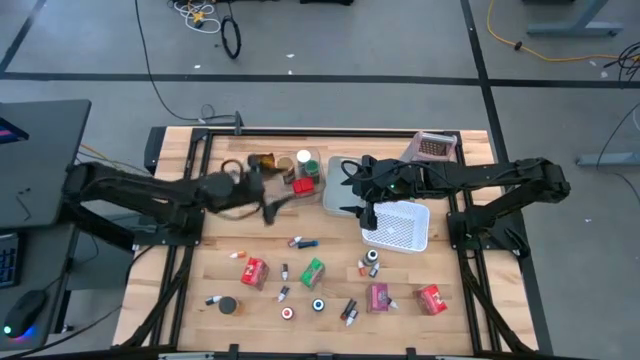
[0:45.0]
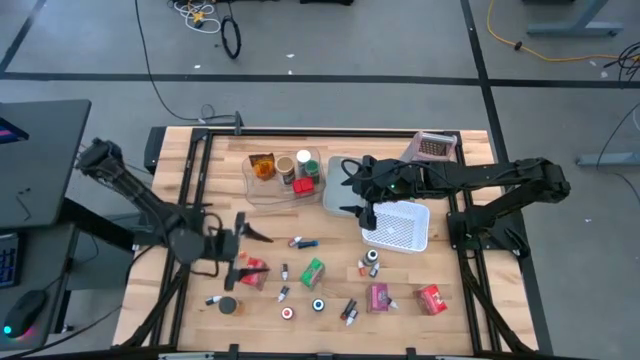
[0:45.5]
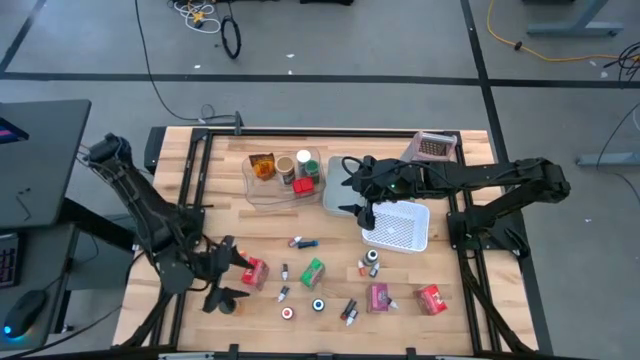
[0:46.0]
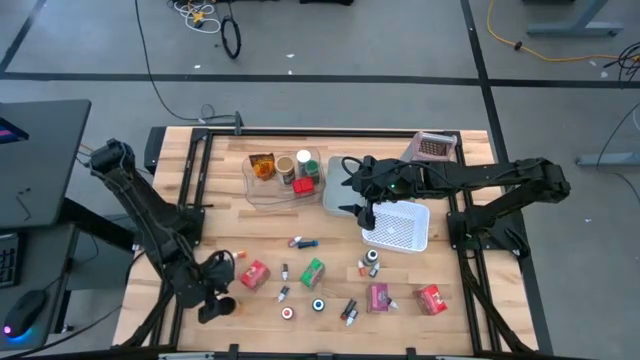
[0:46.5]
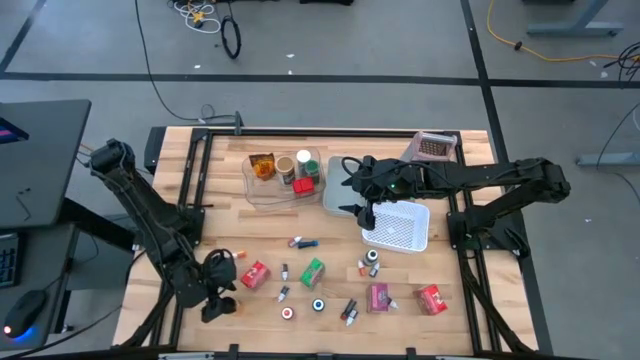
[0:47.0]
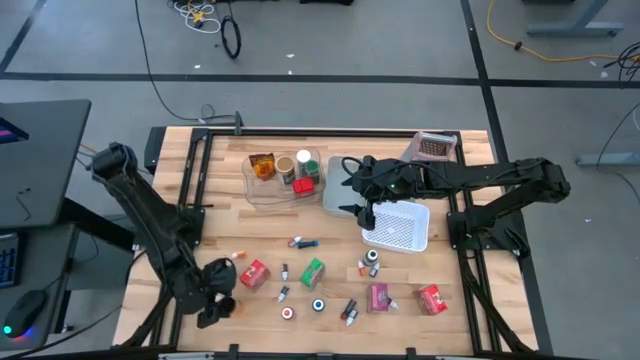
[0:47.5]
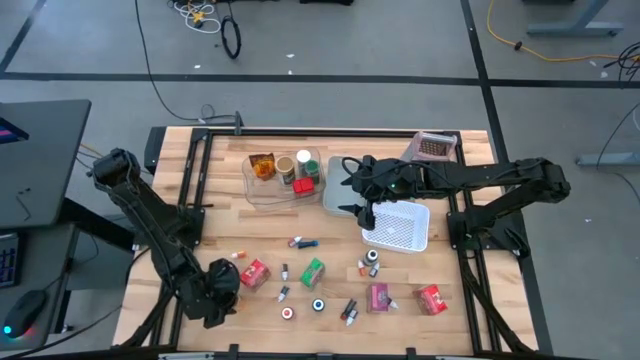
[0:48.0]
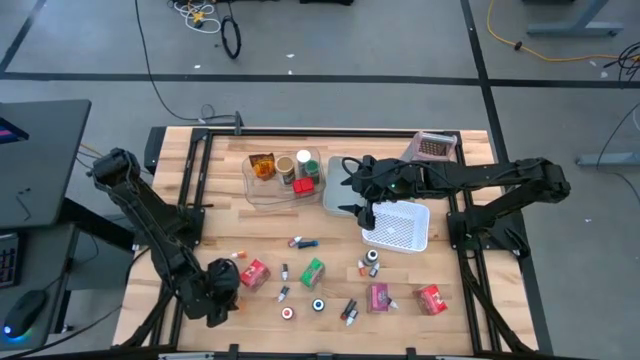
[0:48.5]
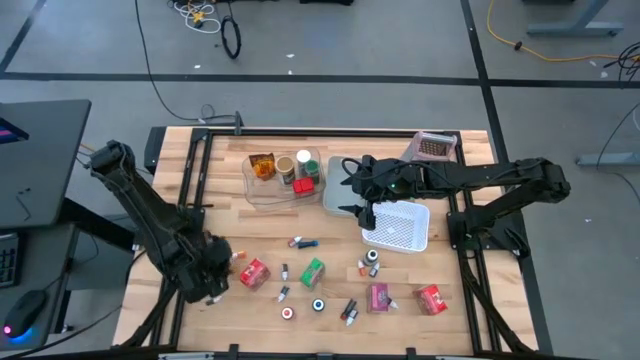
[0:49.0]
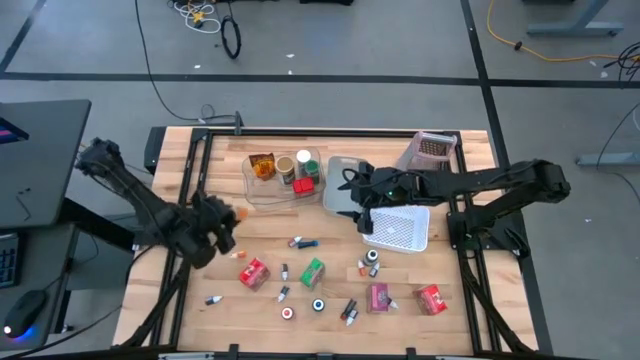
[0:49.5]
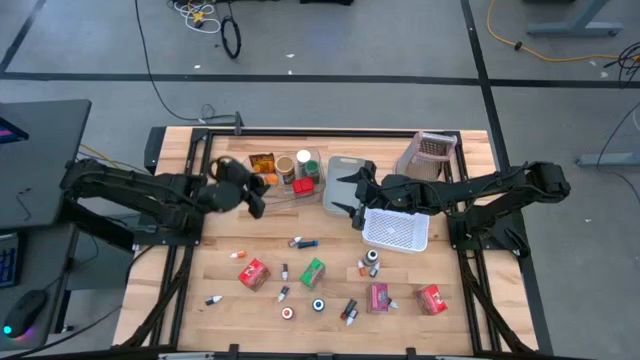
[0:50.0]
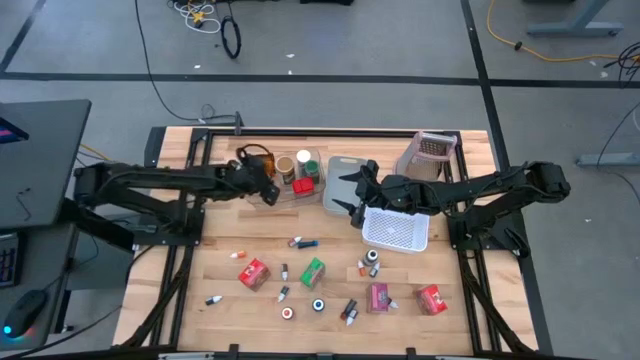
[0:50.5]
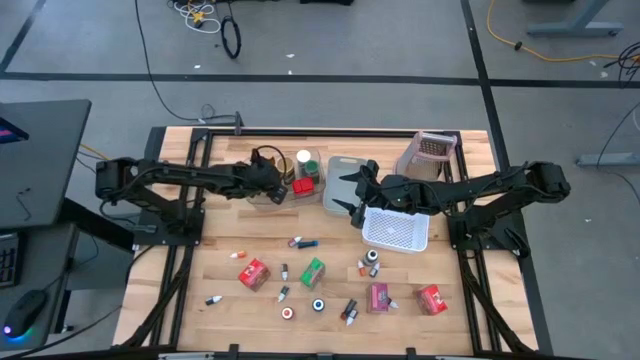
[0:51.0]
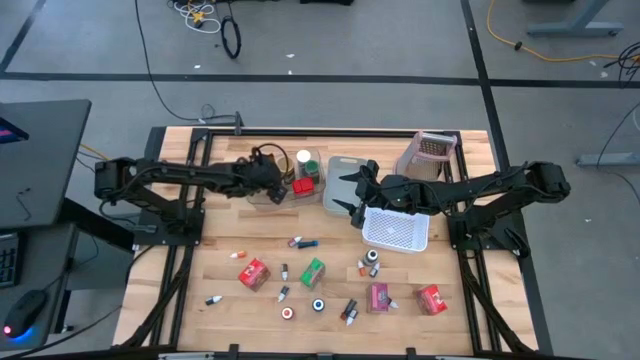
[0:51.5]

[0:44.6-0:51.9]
Task: Pick & Place Kitchen Items
Put the black seasoning bottle into the transparent bin

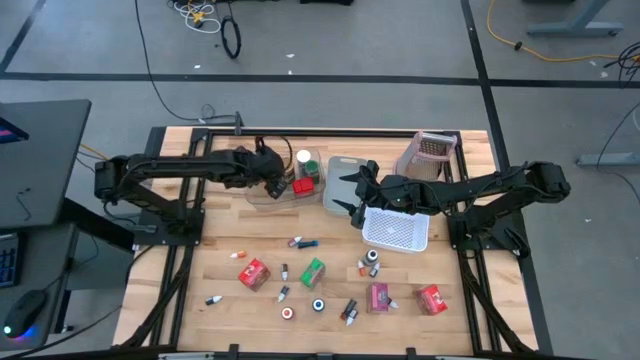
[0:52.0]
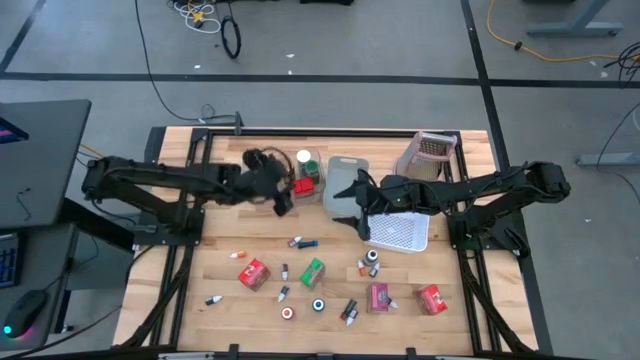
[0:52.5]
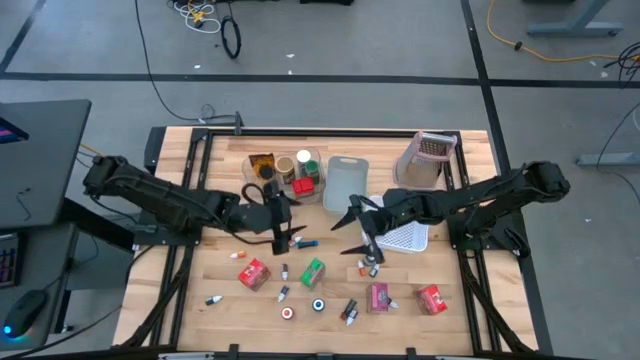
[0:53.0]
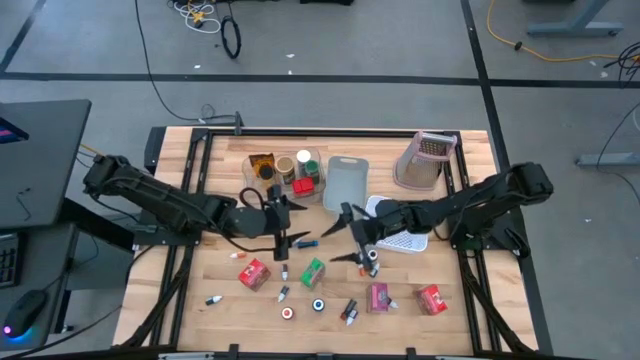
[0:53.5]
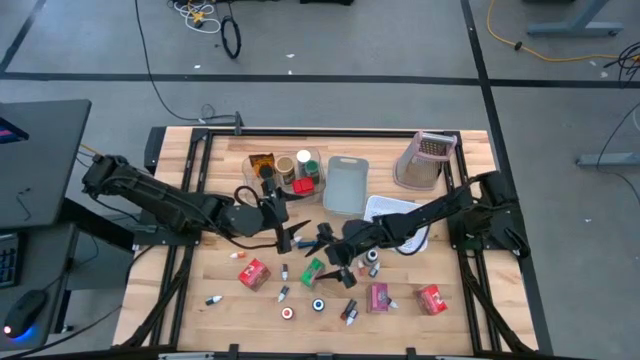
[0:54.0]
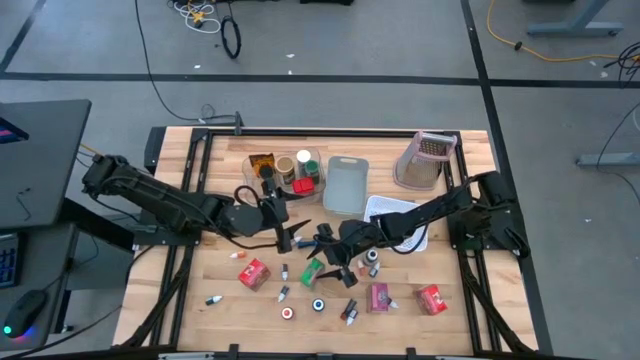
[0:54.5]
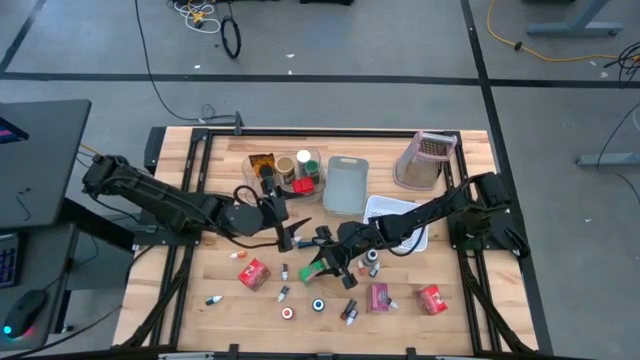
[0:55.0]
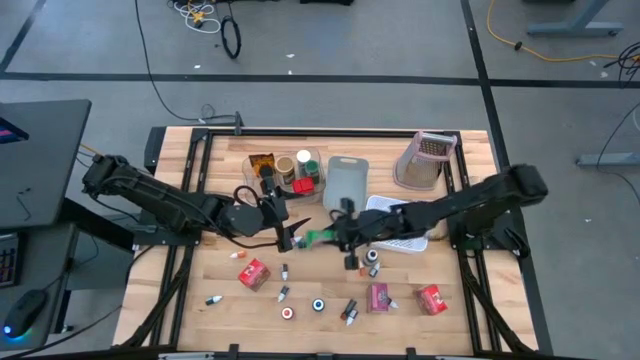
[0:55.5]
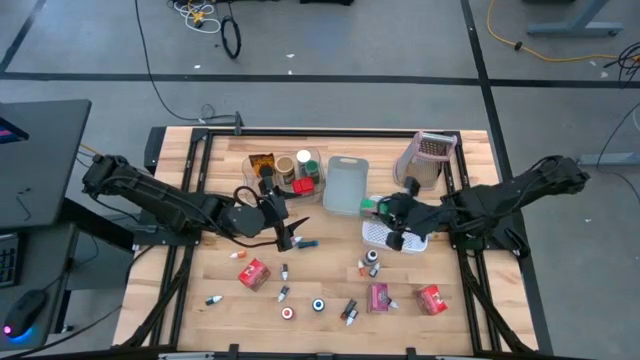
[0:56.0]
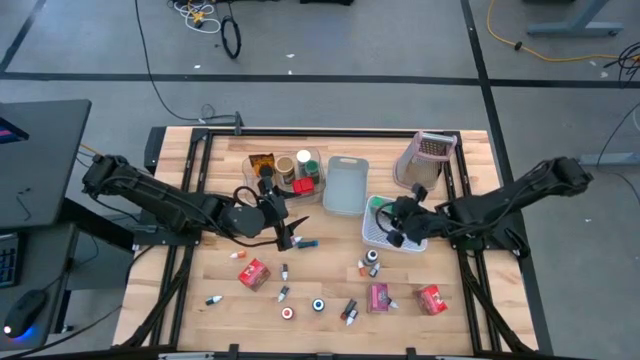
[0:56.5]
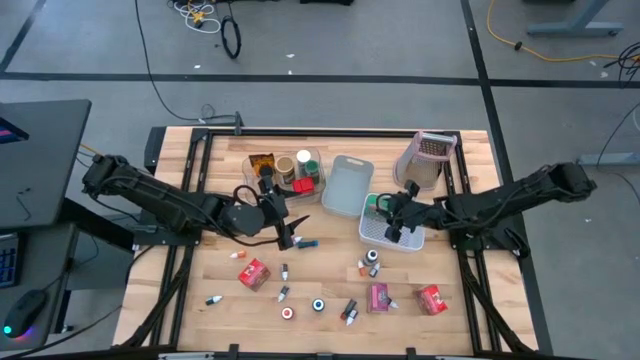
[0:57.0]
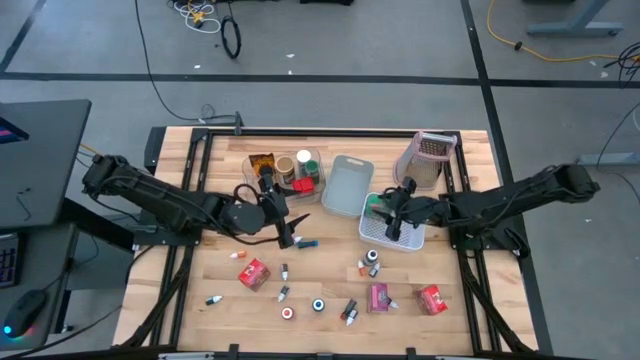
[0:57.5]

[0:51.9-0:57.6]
Put the green cereal box into the white bin

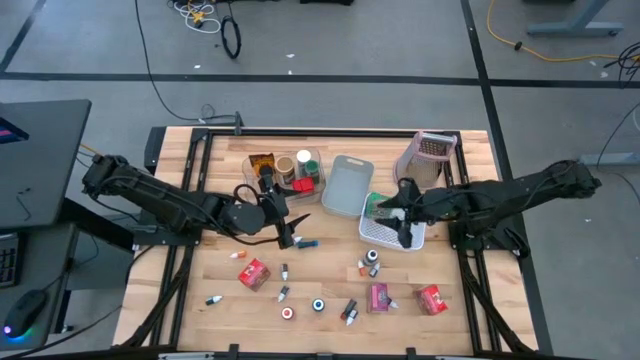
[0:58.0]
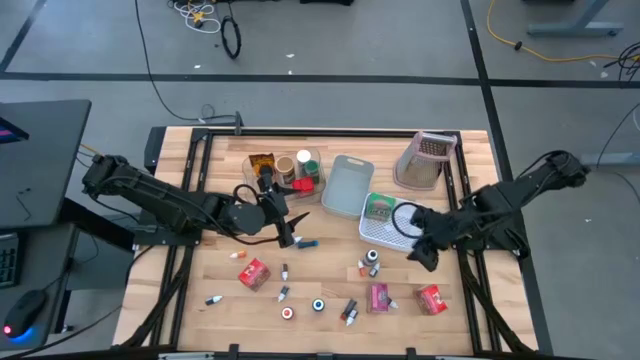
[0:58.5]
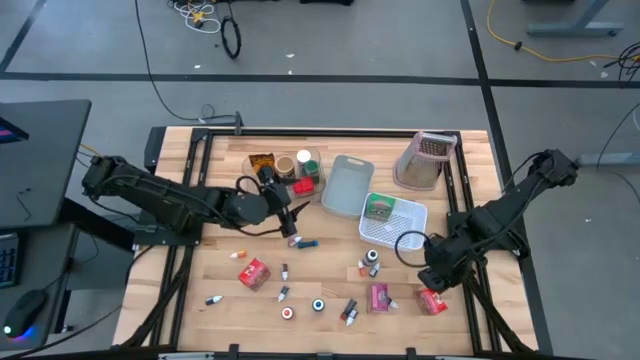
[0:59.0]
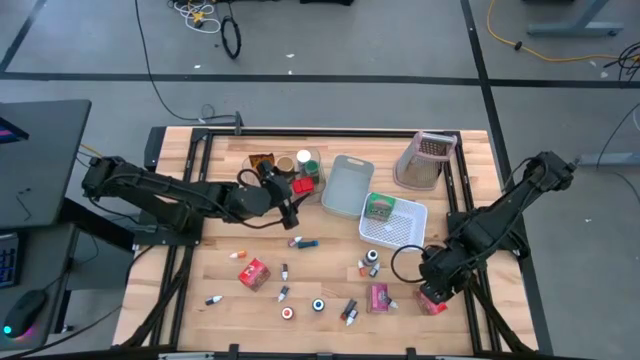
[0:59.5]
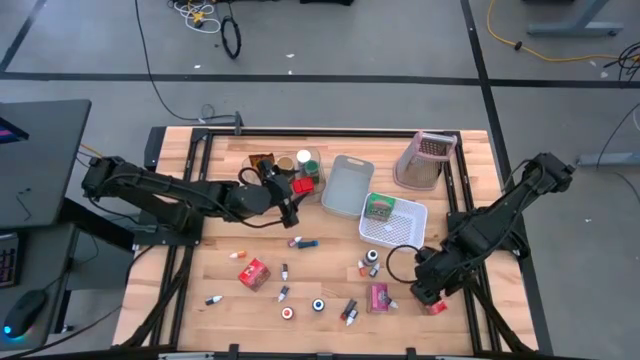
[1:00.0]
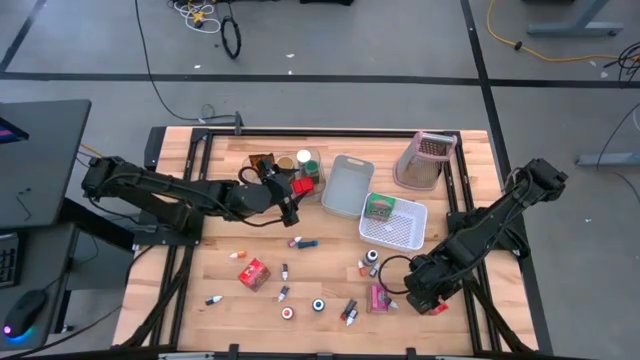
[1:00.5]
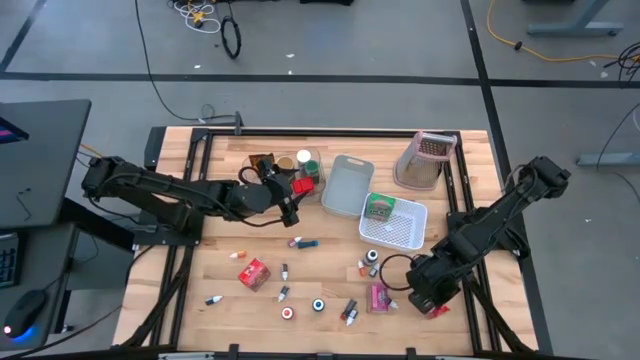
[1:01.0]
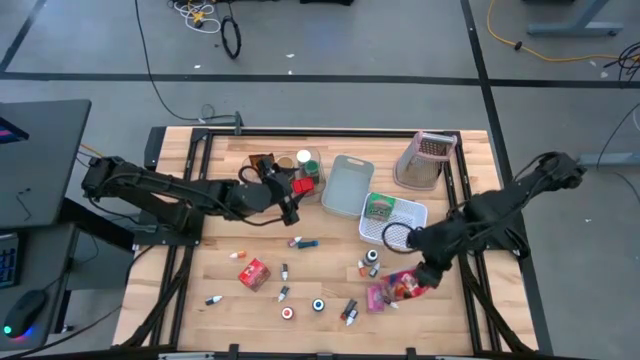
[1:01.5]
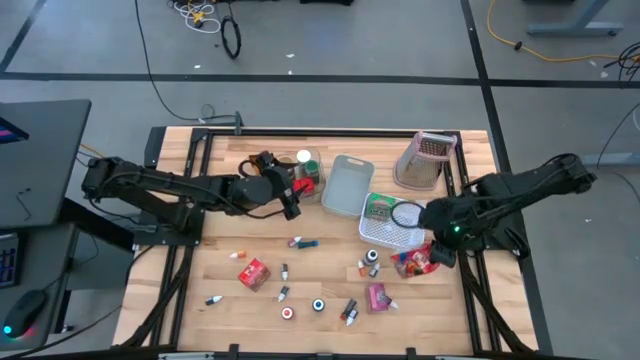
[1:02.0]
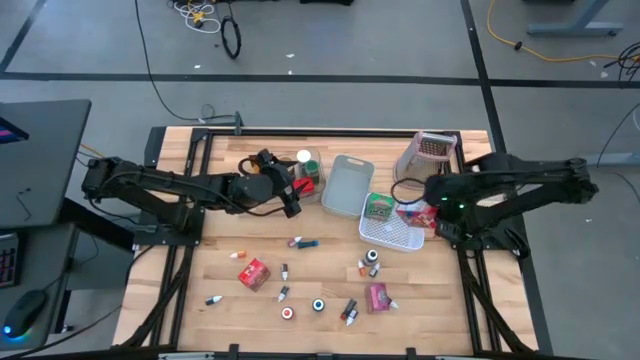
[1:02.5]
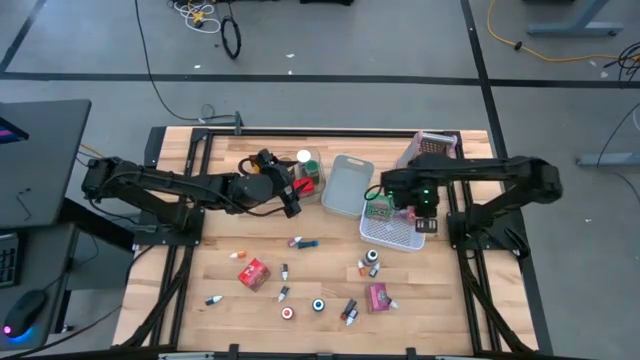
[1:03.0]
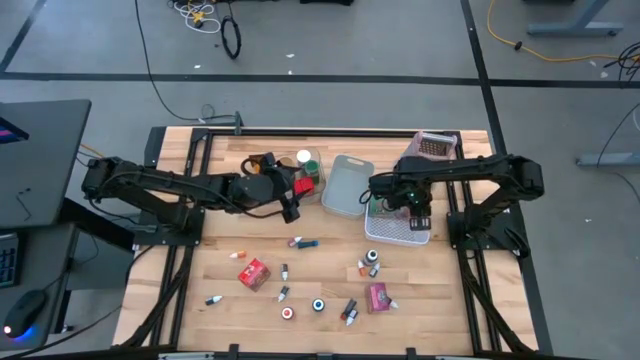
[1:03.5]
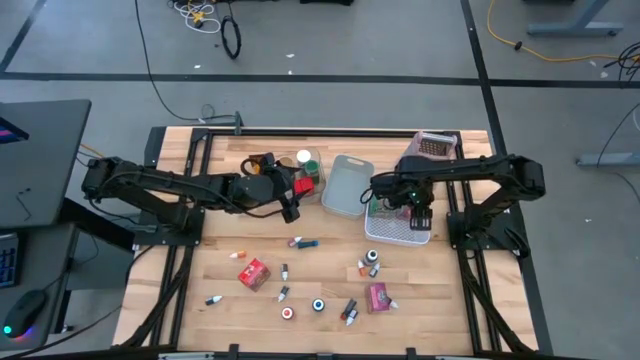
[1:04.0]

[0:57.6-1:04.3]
Put the right red cereal box into the white bin

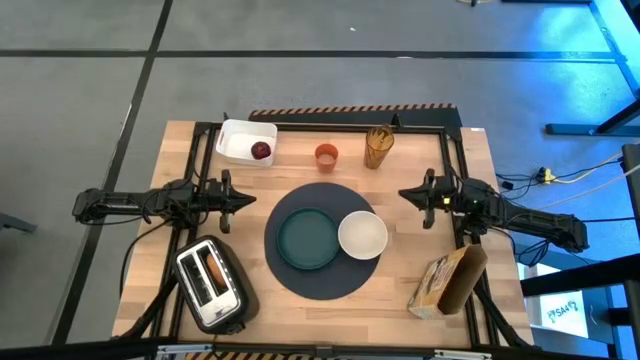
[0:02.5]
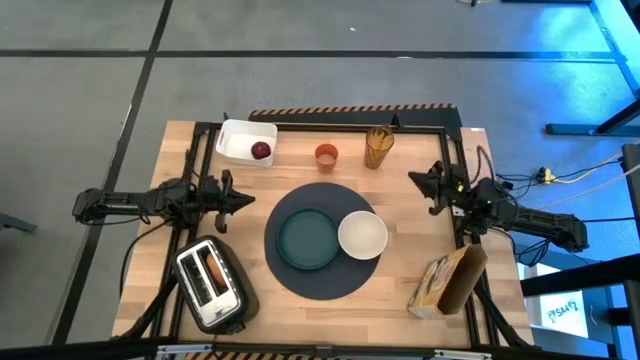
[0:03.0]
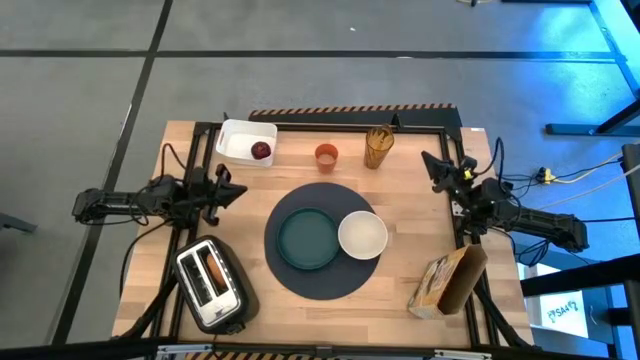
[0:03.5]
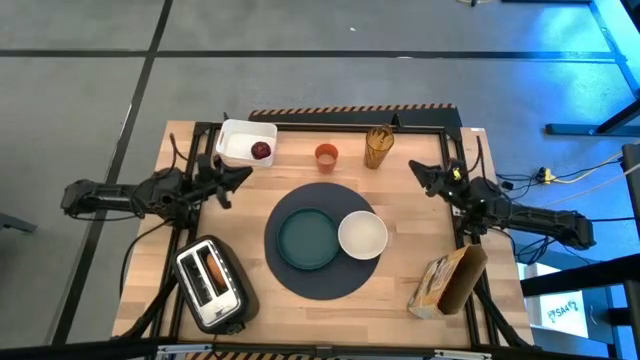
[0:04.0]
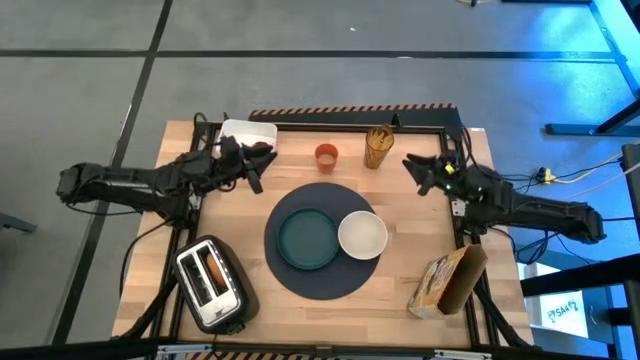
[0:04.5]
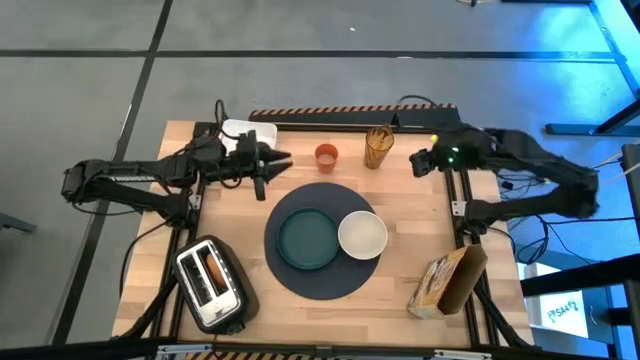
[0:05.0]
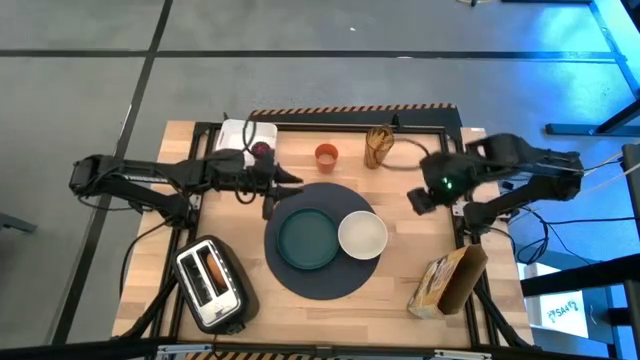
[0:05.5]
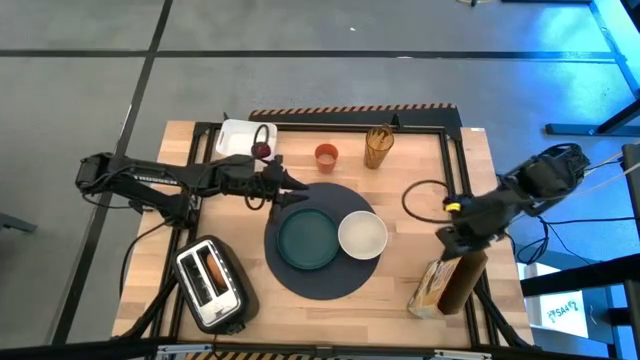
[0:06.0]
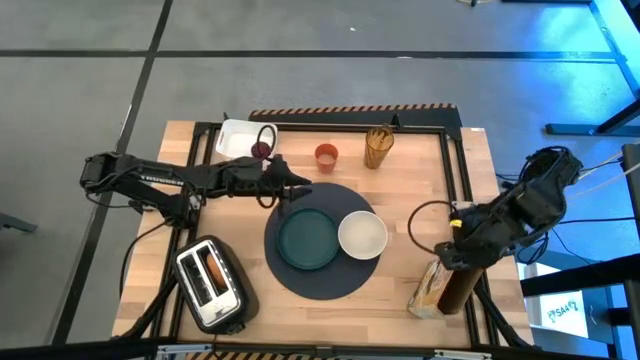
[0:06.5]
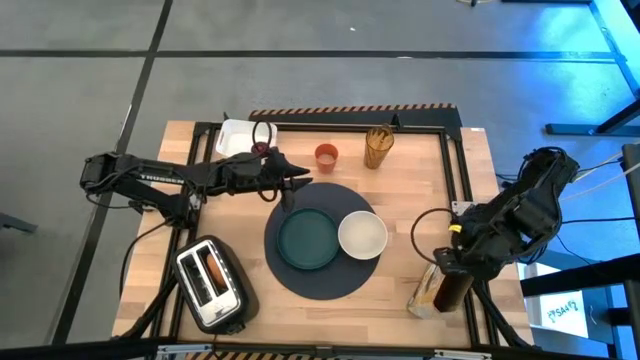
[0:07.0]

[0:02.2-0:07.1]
Task: Arrange a breakfast setting
Pour the cereal into the white bowl
